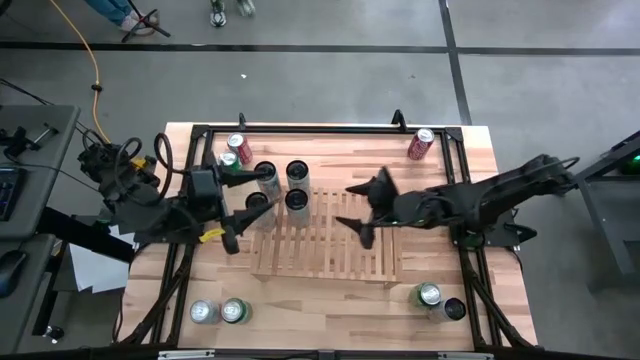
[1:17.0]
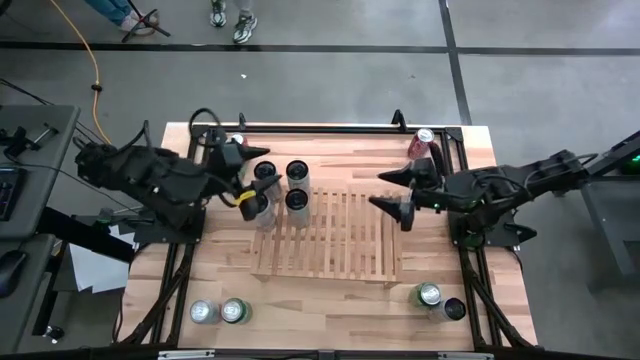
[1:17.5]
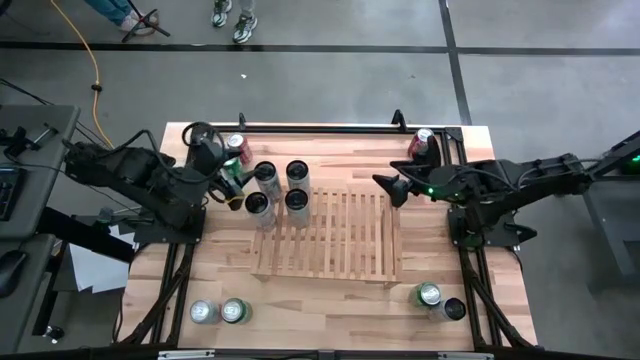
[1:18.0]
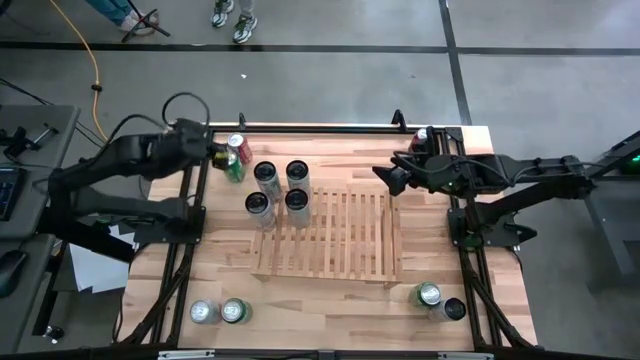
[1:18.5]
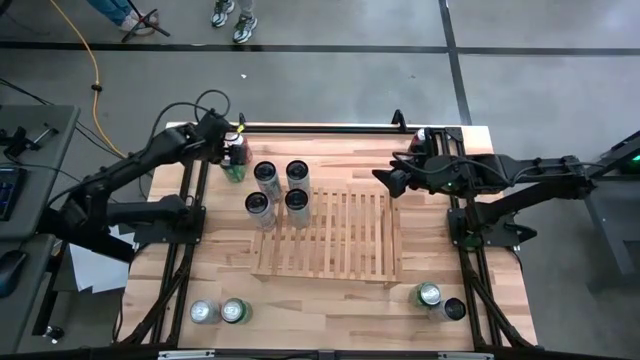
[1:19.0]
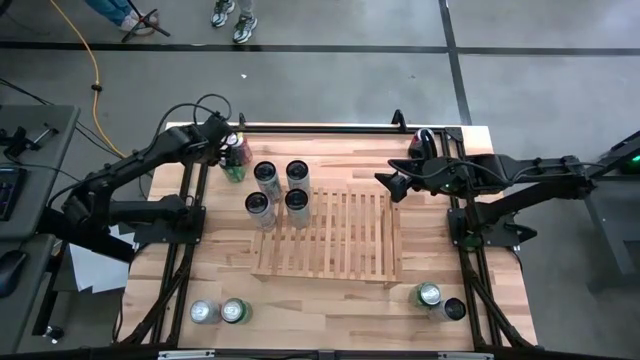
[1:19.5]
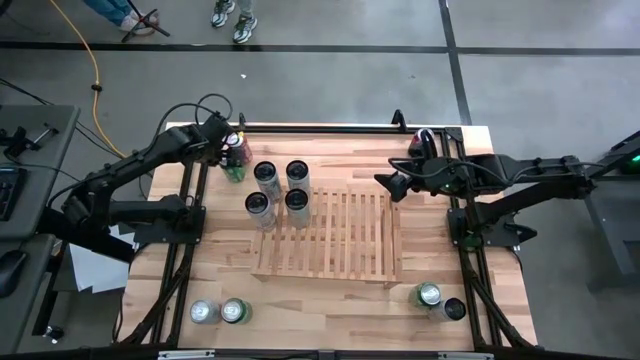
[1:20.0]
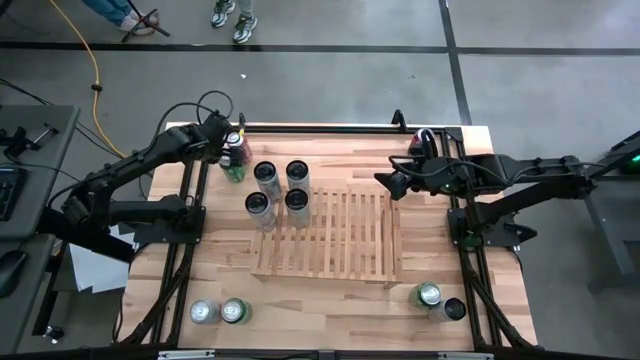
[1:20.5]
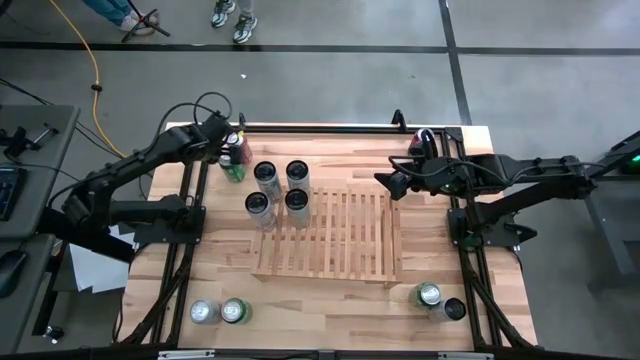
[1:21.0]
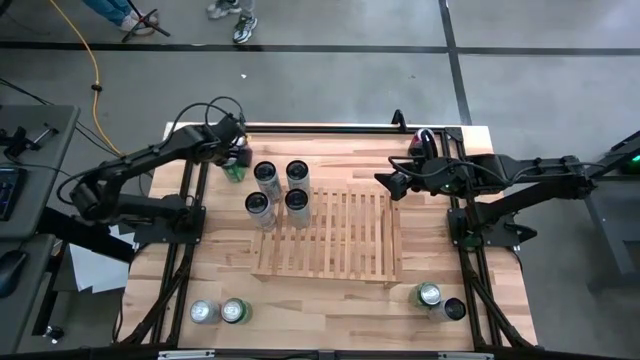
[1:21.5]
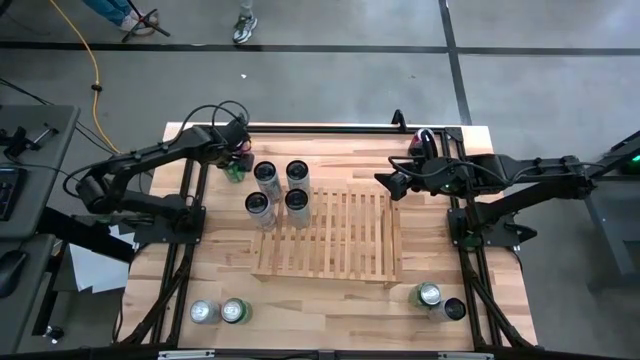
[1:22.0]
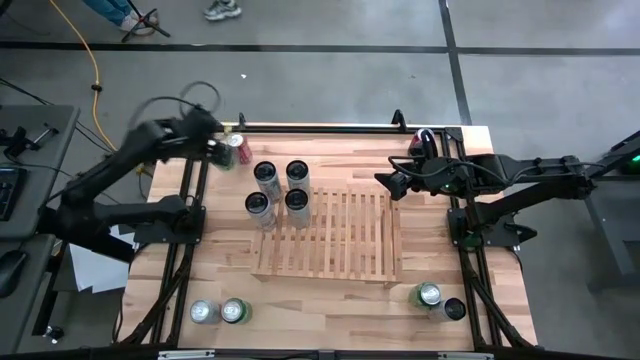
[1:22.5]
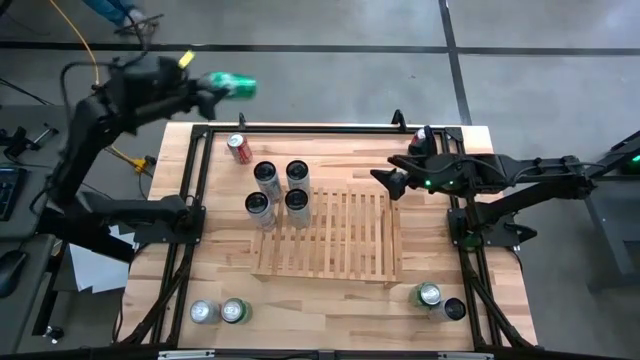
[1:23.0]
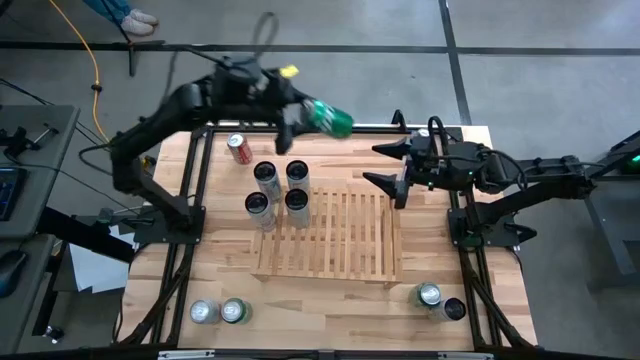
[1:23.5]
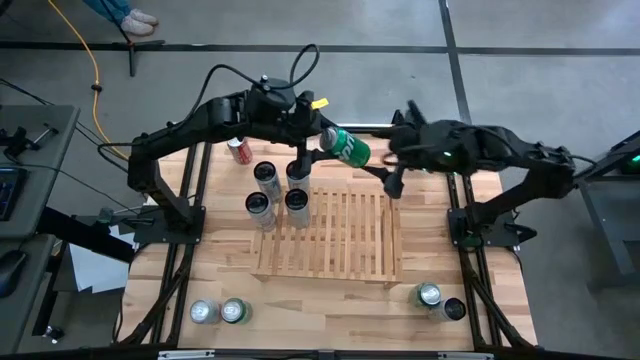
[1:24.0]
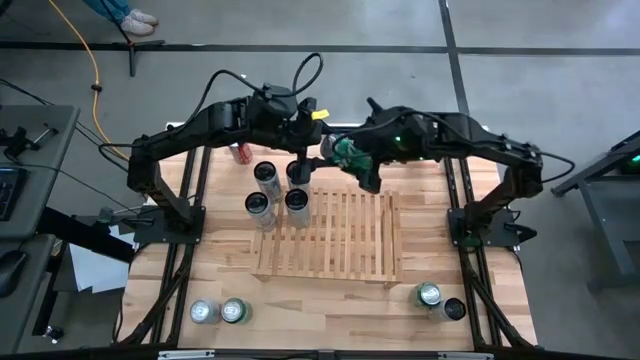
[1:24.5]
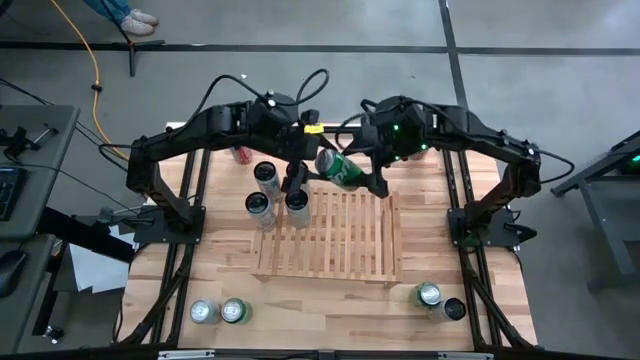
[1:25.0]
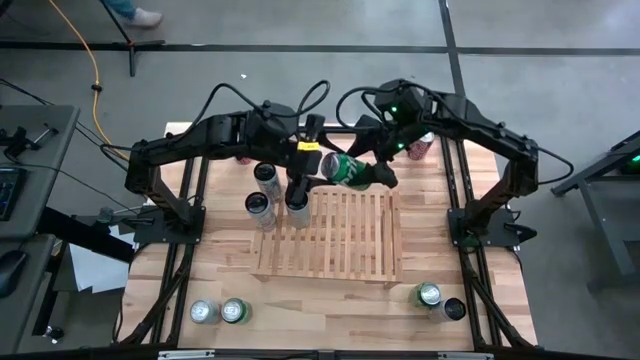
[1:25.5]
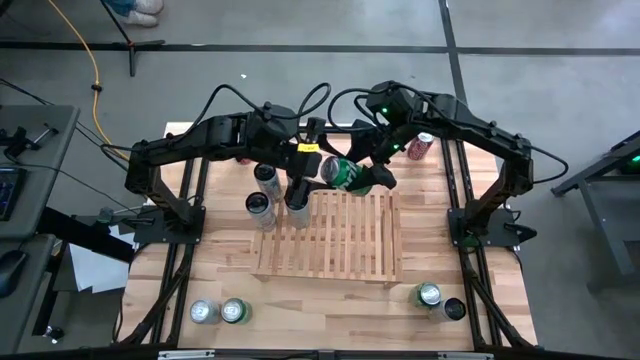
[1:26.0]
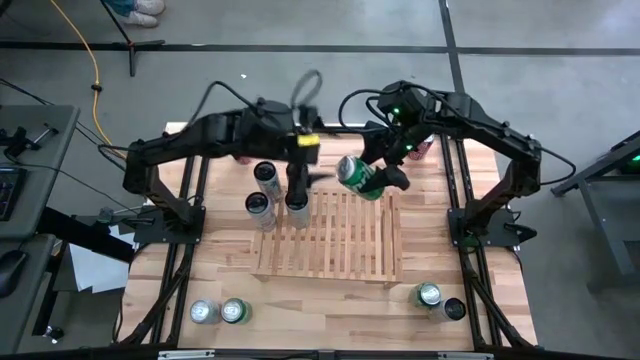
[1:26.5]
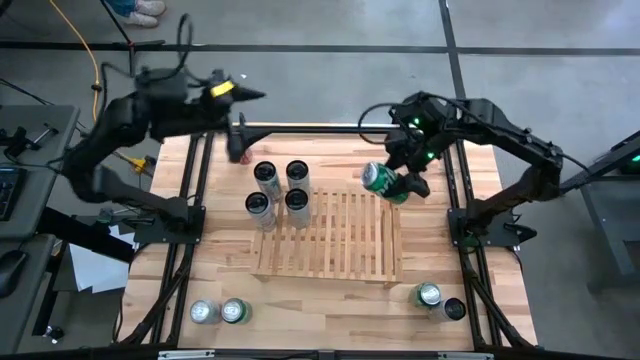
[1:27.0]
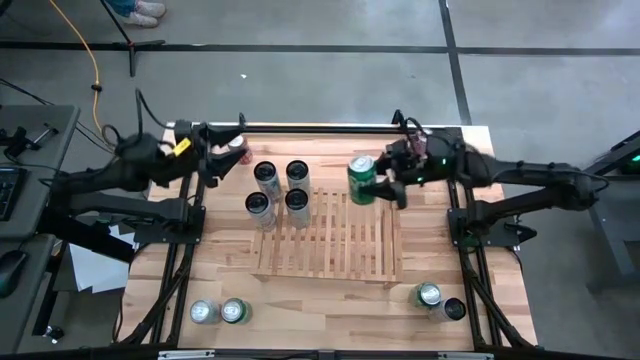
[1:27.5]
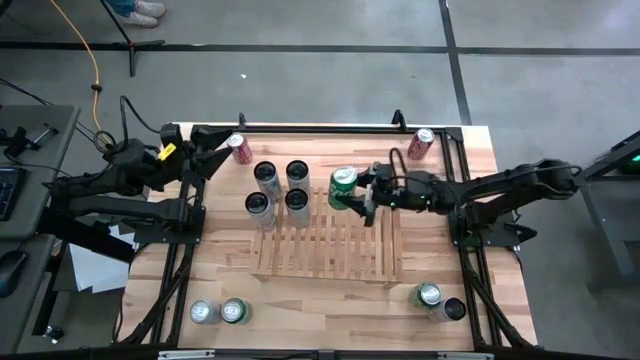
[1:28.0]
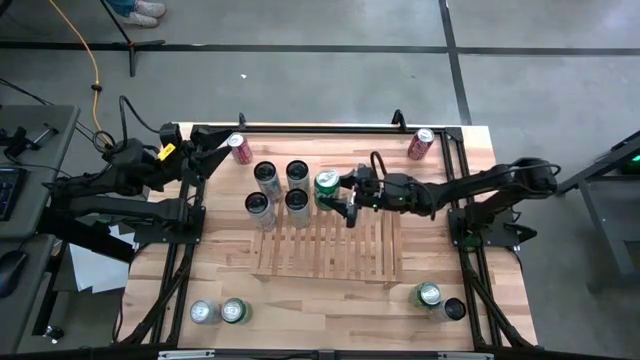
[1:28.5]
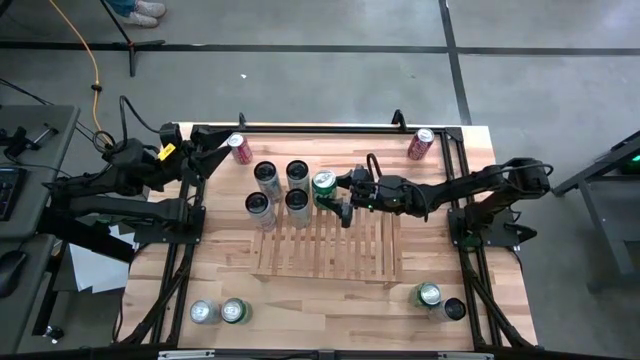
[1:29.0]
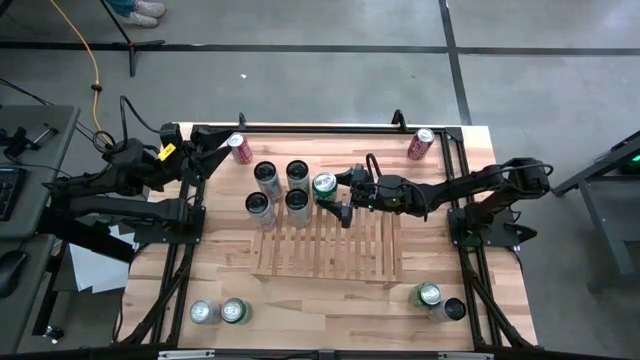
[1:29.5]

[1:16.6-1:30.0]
Task: Place canned beverage on shelf
Put the top left green soda can on the shelf

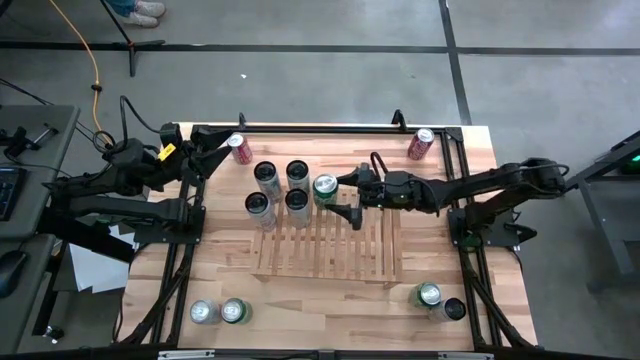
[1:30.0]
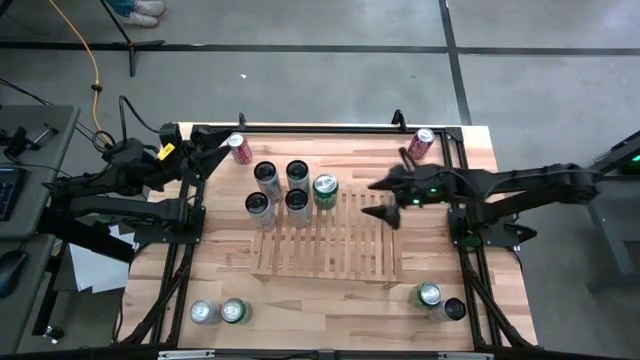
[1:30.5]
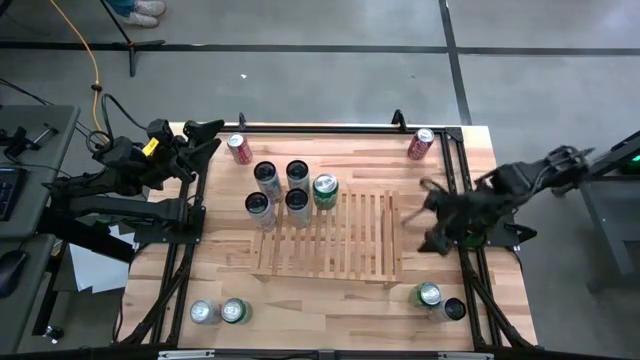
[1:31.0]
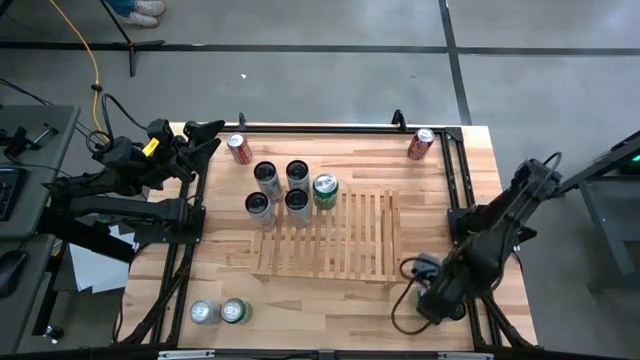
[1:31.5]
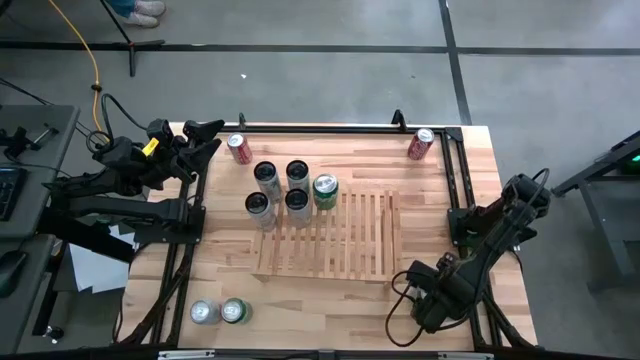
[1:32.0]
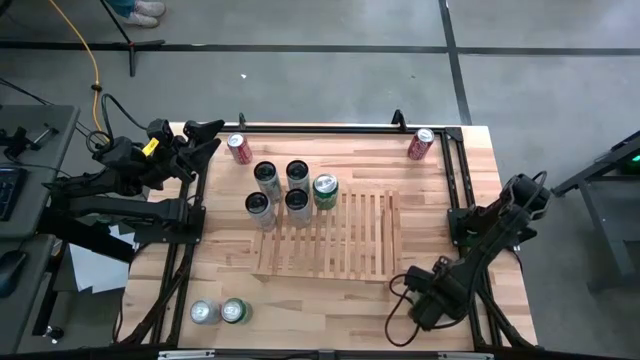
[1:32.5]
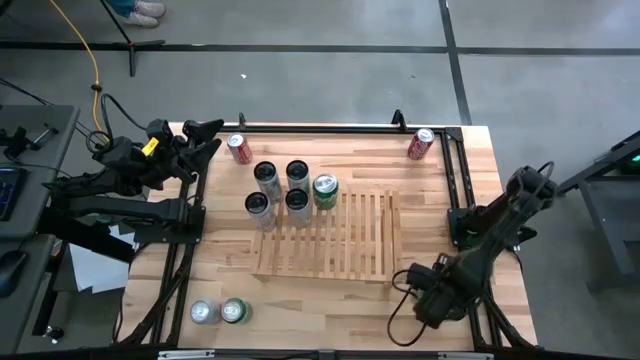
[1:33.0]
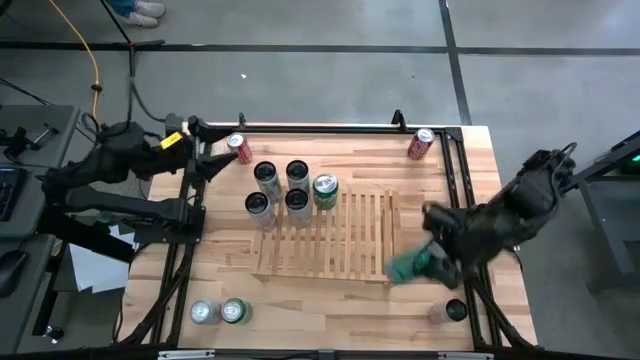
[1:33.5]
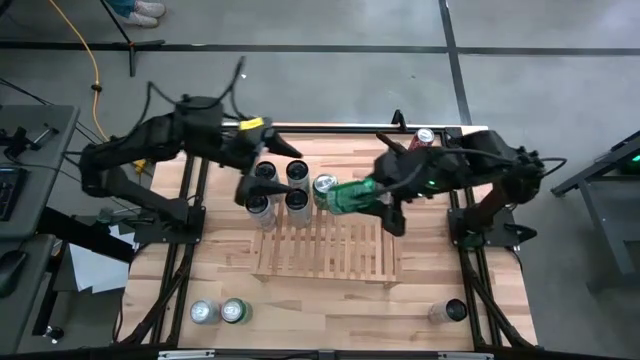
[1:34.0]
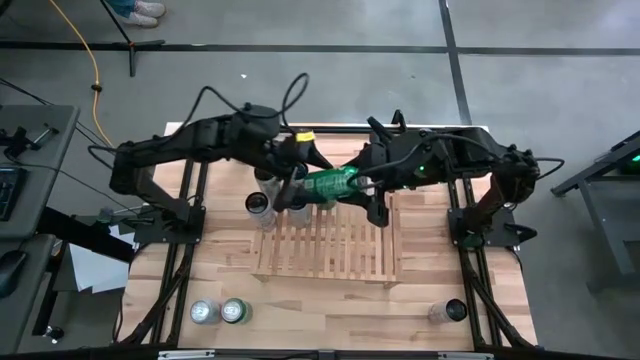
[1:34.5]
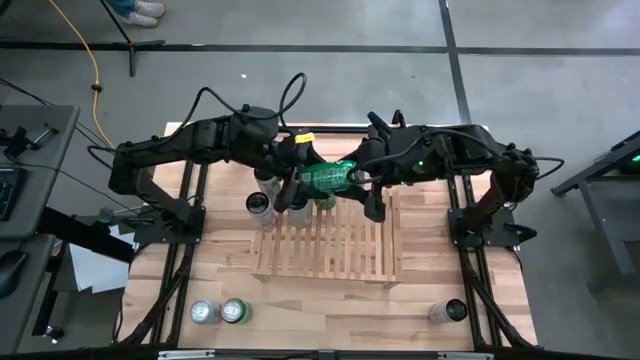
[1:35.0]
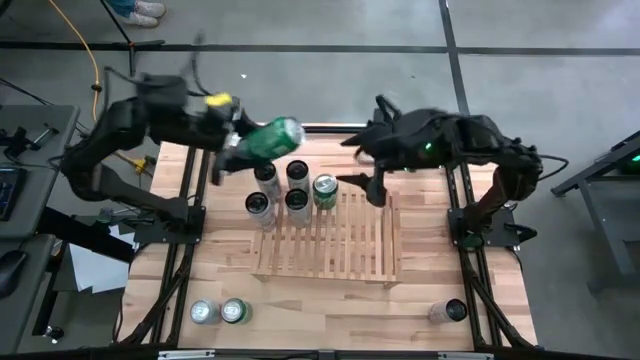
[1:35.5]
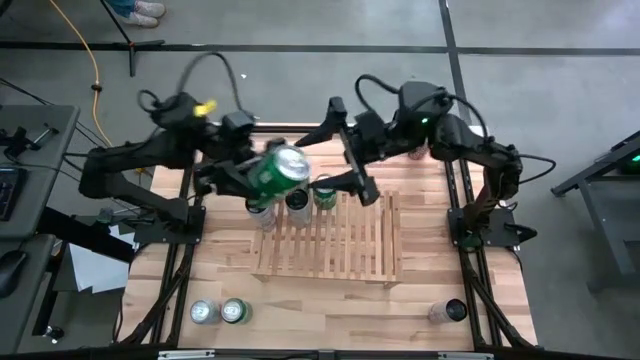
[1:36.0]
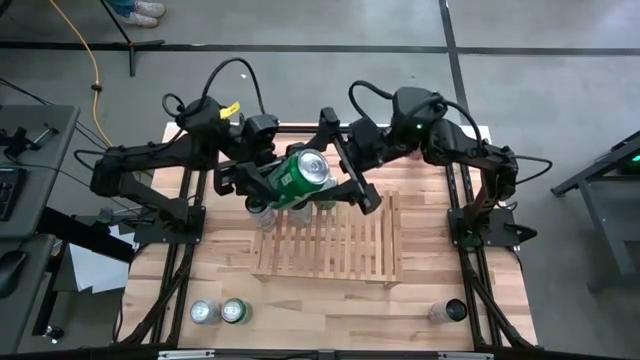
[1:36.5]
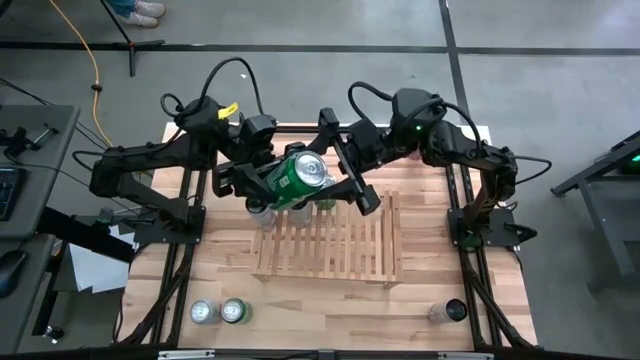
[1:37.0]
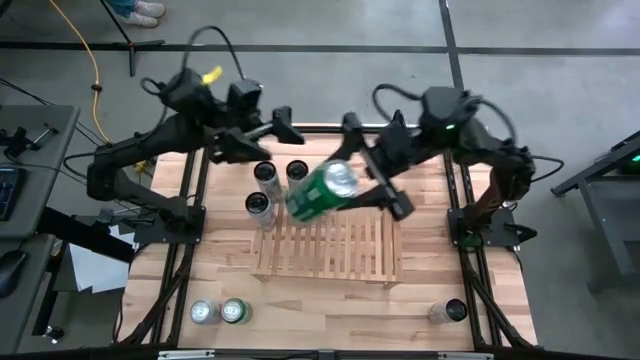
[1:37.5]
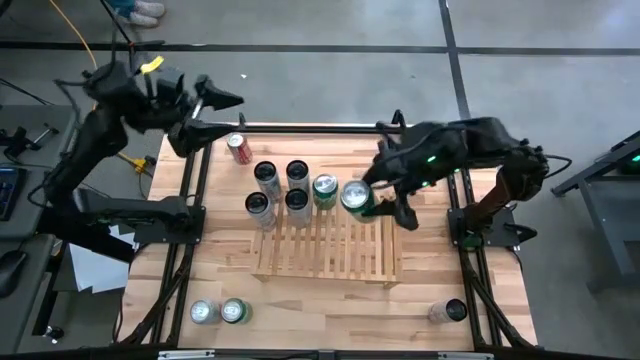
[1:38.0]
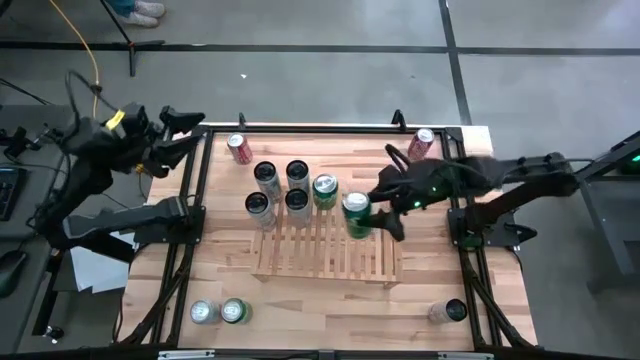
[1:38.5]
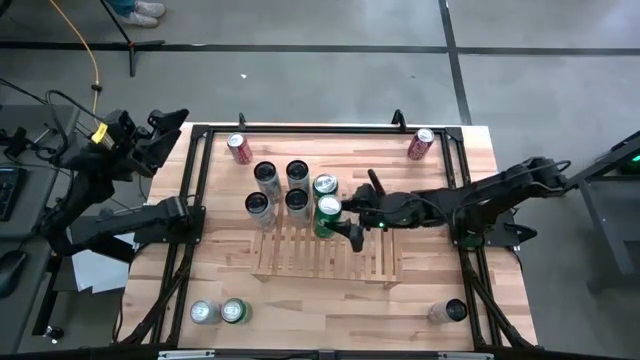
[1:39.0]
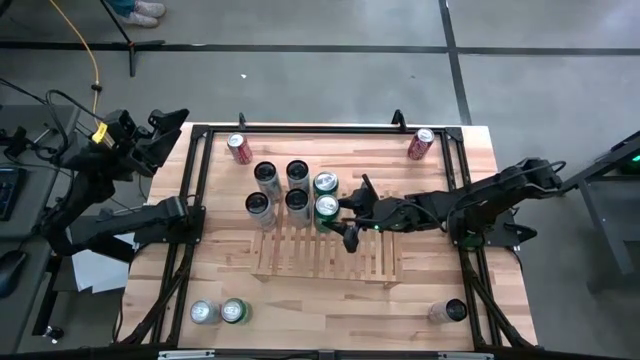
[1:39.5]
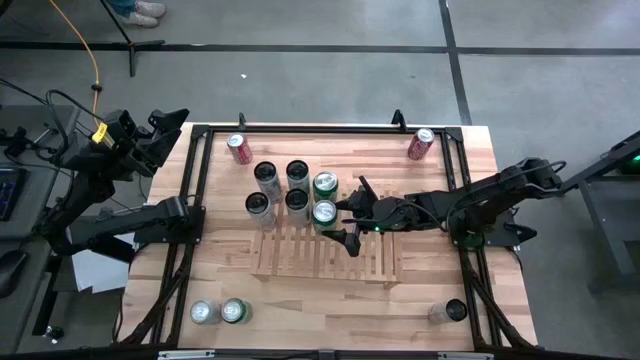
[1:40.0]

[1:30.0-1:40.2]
Put the right green soda can aligned with other green soda can on the shelf
